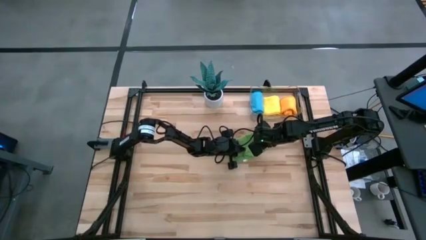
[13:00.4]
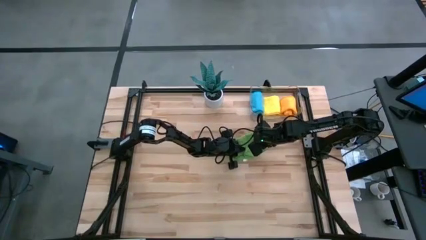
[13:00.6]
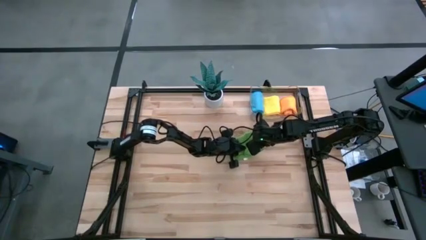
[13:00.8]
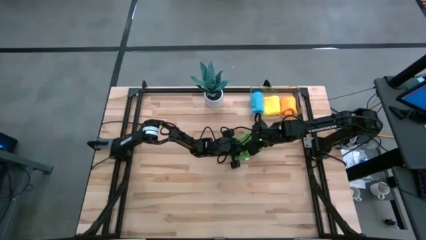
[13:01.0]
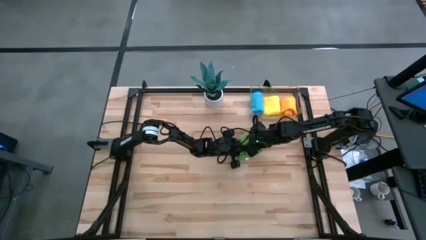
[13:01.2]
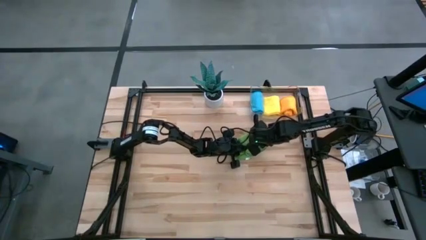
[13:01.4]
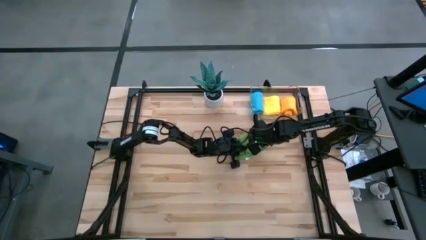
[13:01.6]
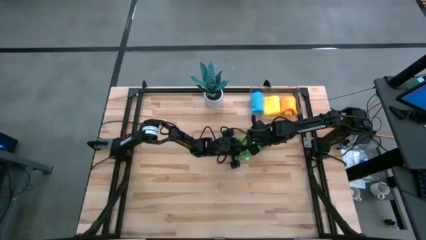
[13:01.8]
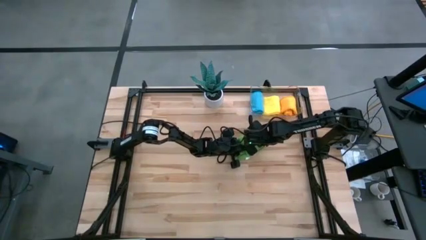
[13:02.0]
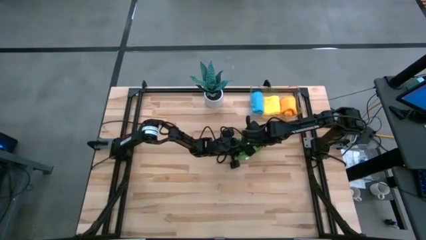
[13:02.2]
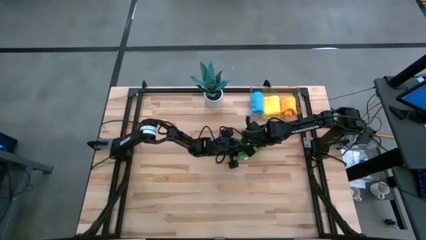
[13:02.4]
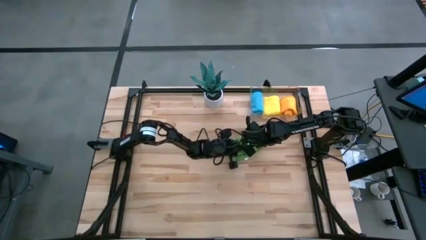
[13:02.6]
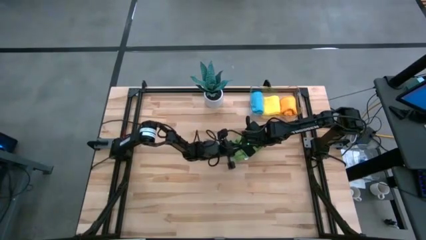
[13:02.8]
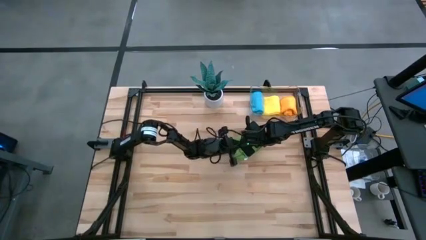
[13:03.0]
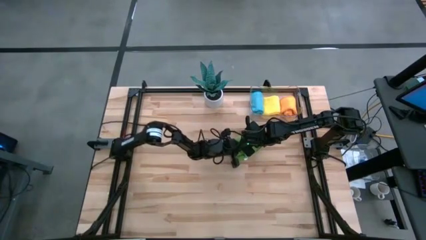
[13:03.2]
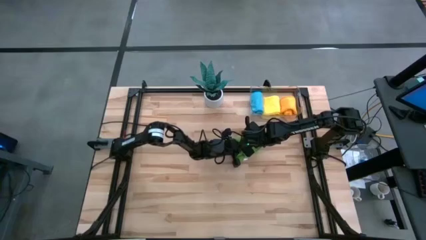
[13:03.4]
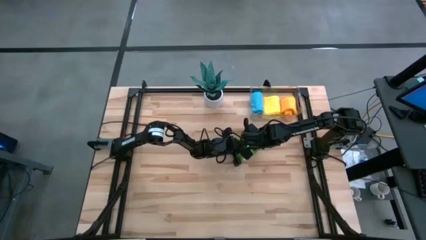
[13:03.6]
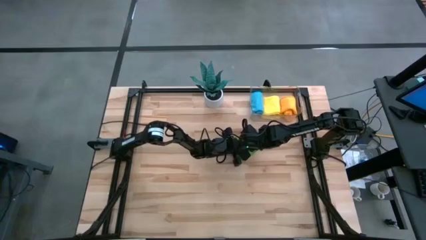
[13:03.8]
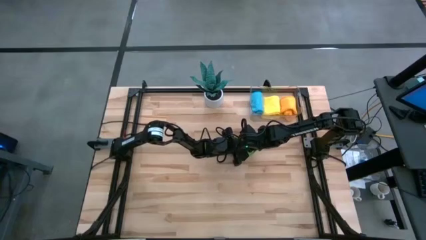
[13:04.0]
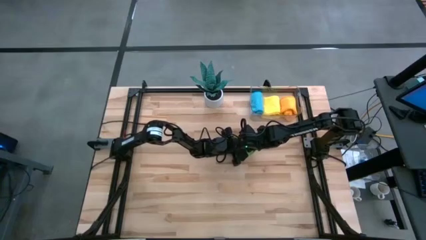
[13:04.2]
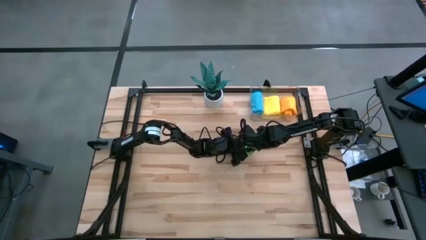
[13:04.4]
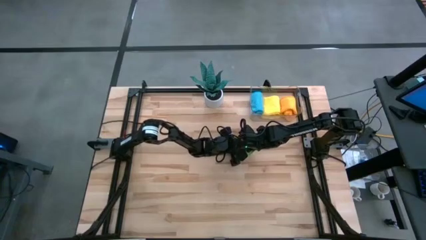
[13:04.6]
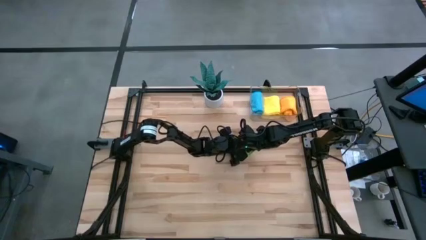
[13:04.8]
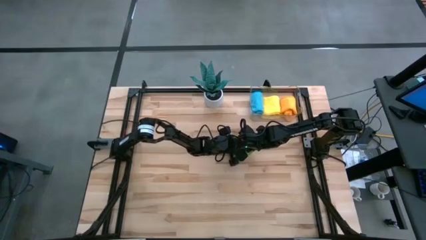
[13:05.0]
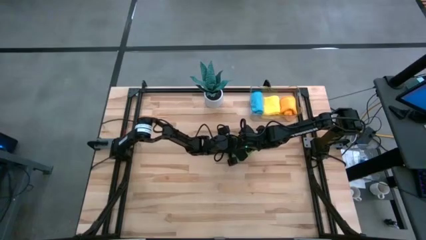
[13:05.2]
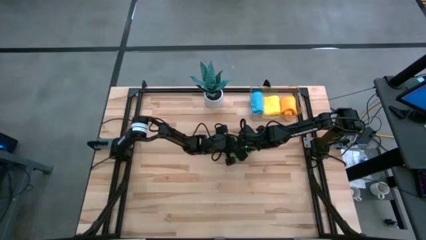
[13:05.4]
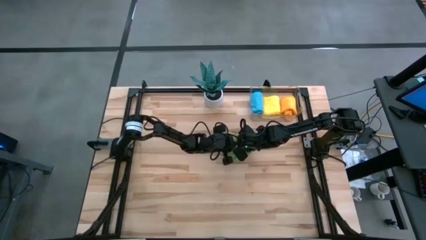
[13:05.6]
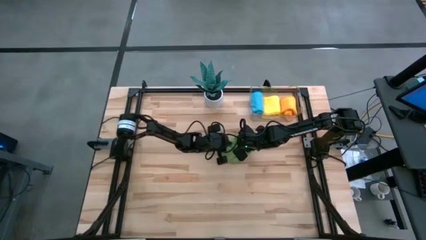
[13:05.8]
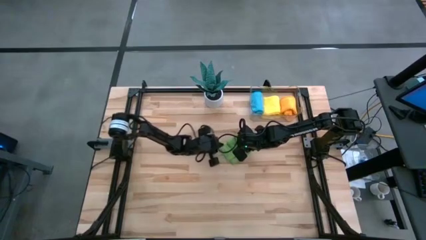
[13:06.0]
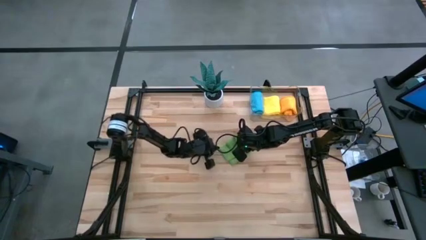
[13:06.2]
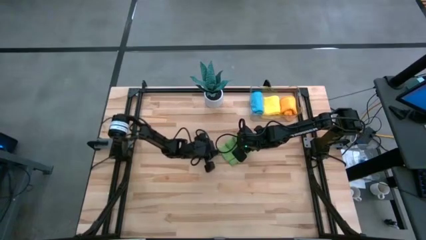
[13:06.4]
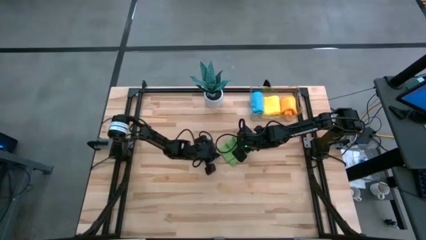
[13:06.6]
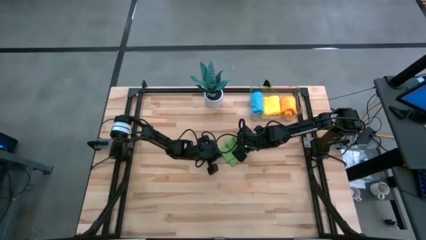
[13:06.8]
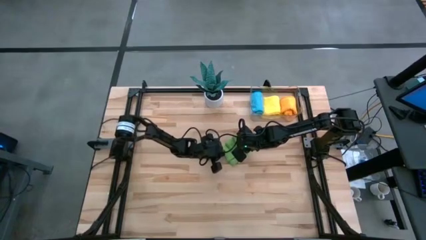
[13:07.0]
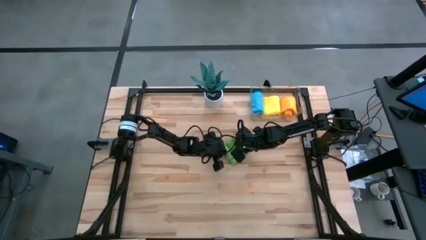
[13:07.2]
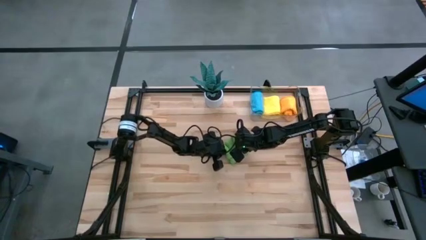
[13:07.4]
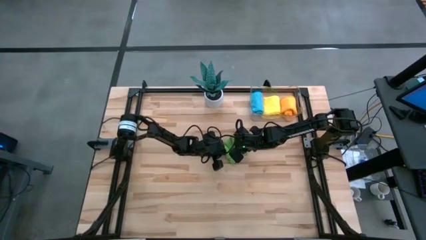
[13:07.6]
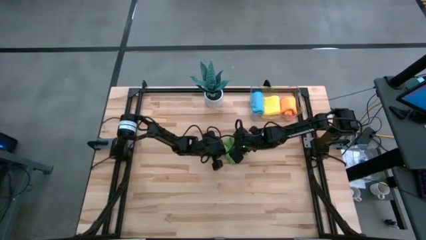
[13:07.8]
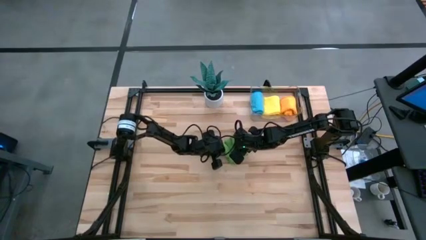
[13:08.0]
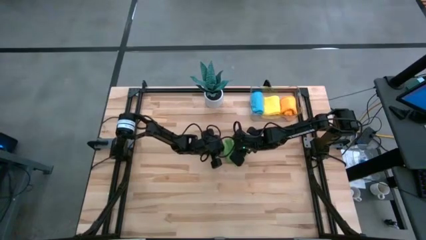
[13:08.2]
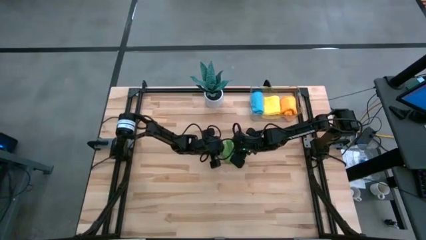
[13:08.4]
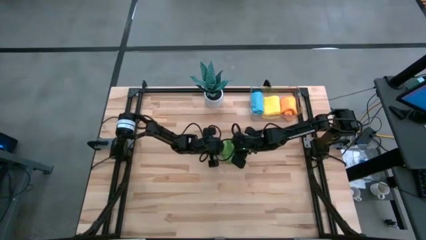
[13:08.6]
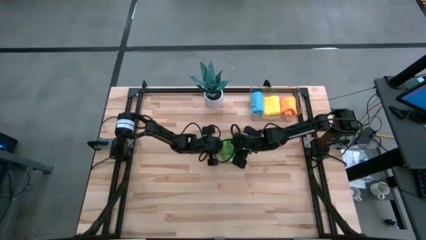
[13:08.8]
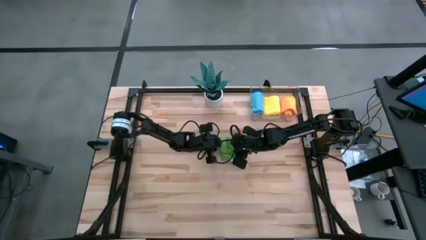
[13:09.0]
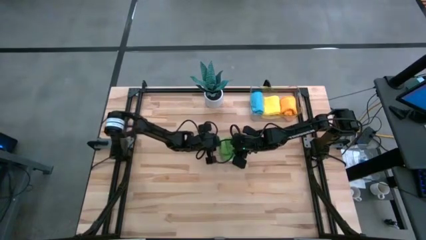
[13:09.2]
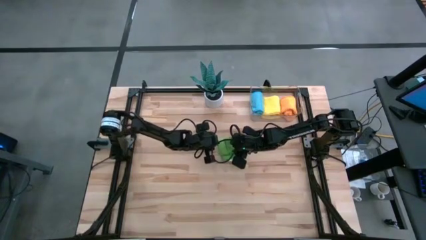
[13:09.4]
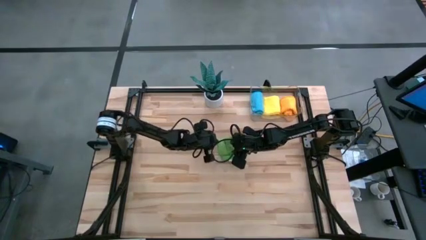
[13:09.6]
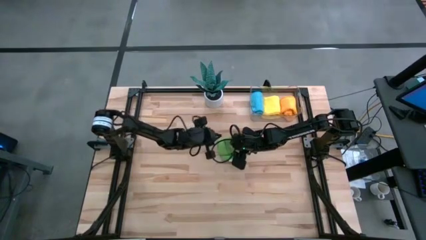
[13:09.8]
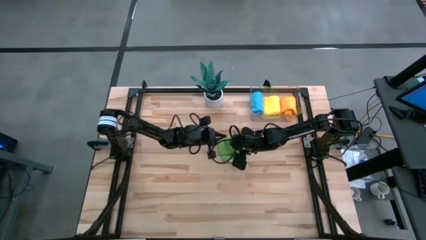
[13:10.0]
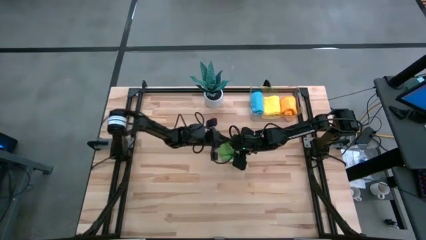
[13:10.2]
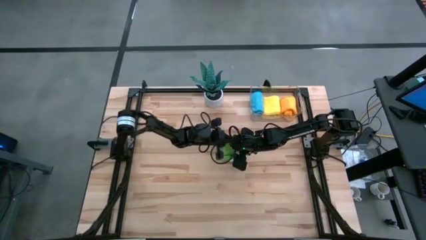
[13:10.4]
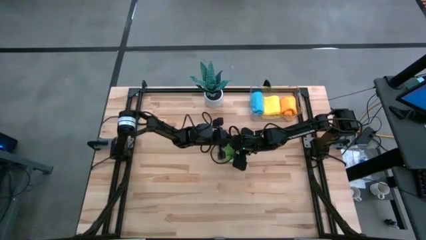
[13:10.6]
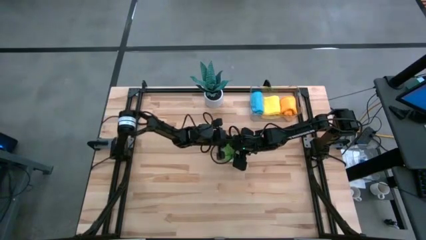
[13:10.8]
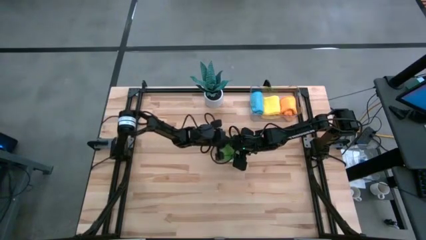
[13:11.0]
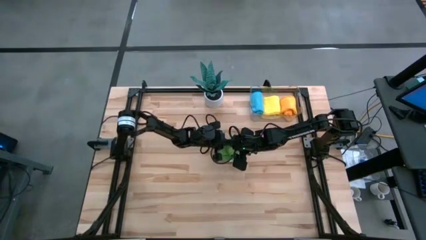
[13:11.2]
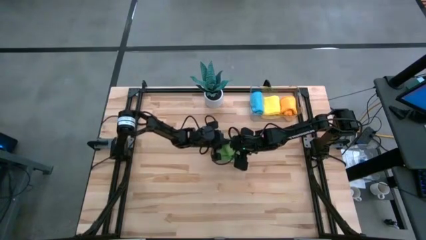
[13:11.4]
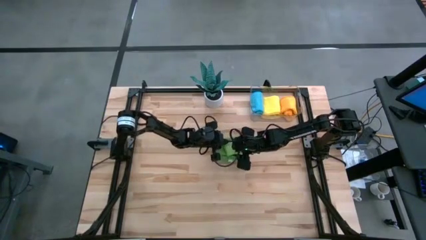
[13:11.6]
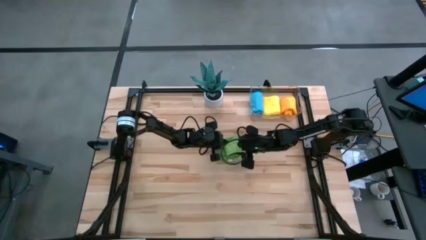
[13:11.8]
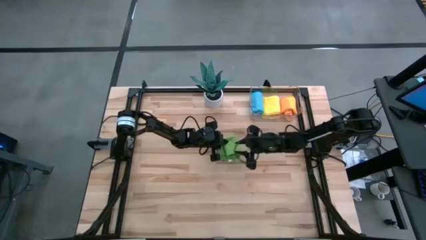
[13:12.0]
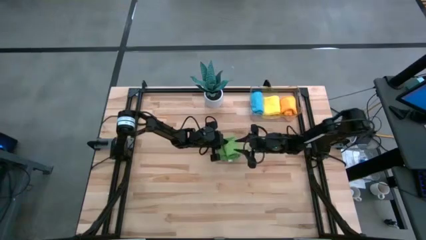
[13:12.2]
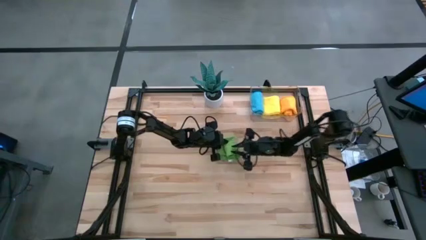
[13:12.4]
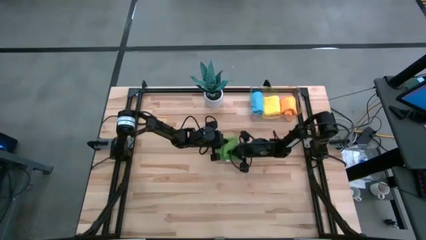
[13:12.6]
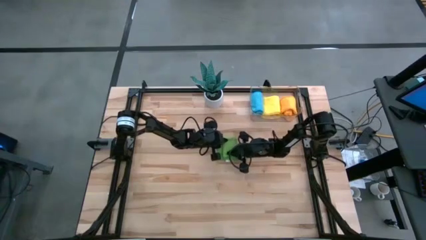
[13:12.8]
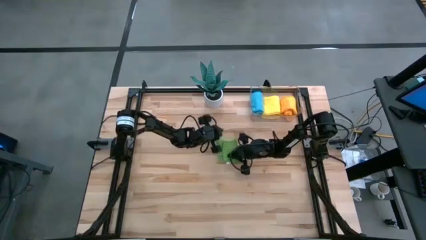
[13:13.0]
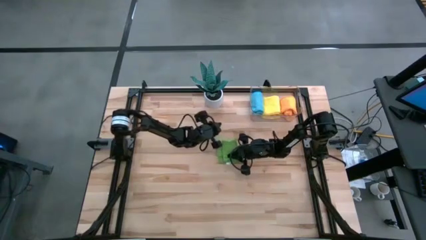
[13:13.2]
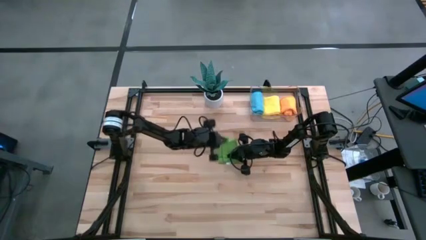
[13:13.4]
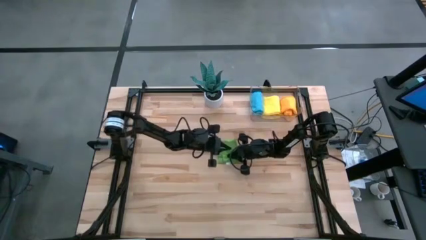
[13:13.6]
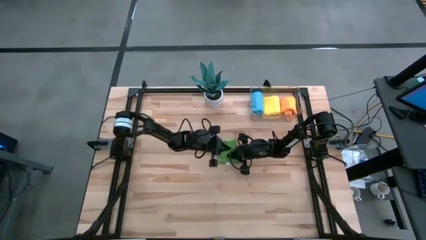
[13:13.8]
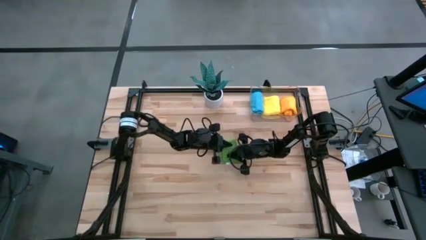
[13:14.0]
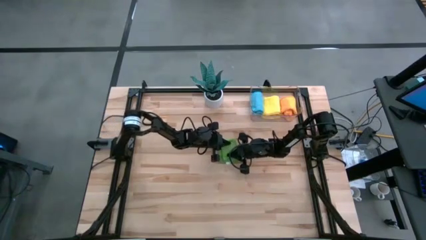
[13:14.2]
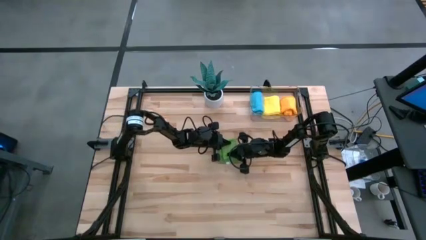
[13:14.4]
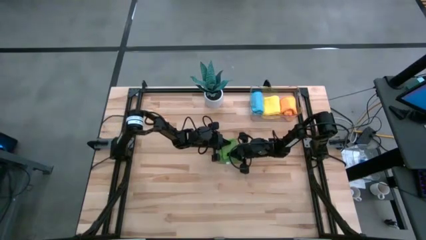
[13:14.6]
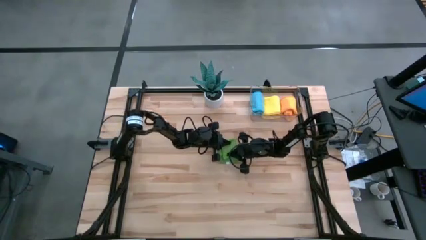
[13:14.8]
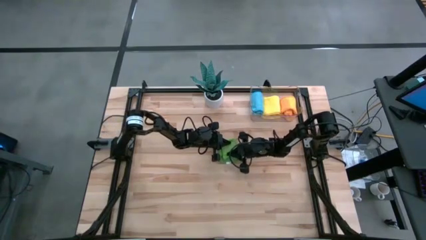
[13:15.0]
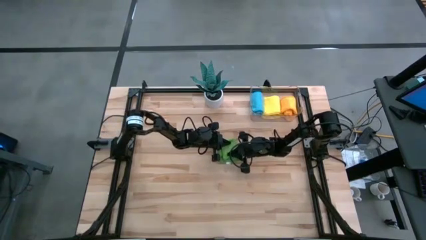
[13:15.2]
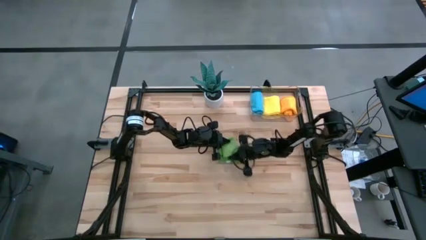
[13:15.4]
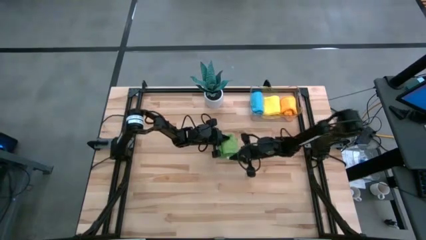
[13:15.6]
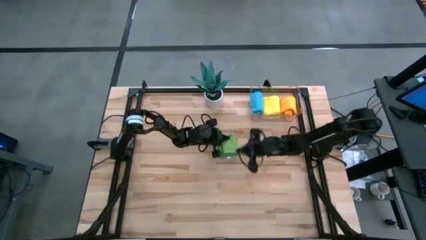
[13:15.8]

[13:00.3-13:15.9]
Task: Roll microfiber towels into tight, uniform cylinder then place into a basket
Roll the green microfiber cloth
